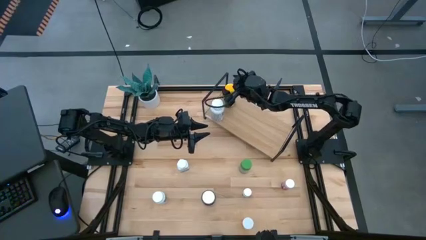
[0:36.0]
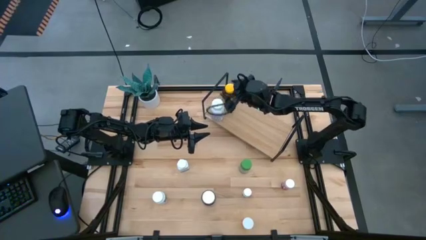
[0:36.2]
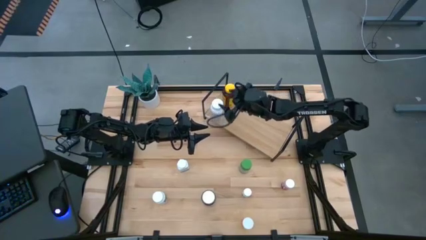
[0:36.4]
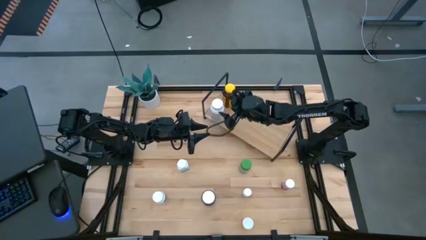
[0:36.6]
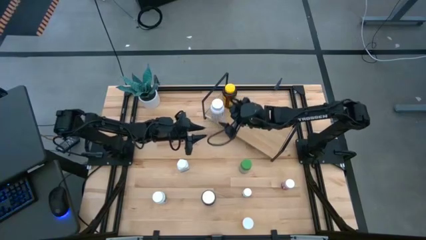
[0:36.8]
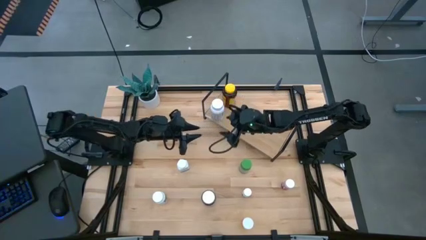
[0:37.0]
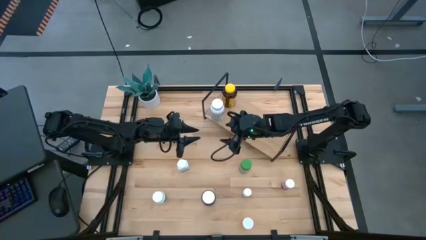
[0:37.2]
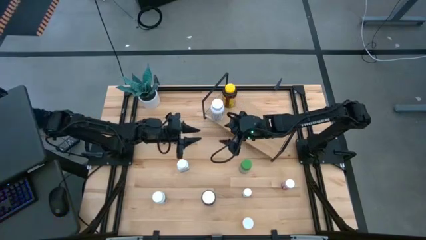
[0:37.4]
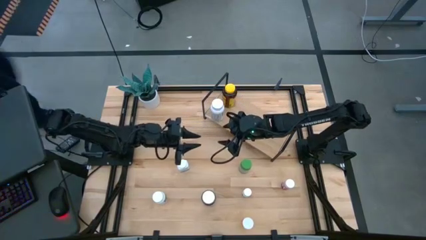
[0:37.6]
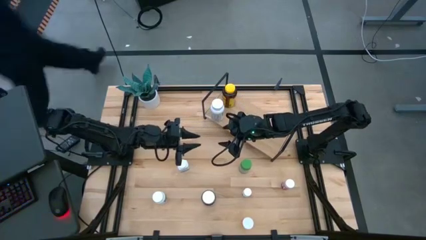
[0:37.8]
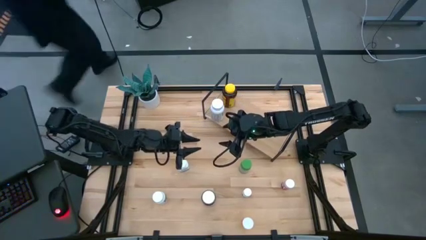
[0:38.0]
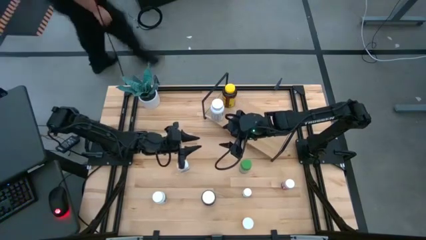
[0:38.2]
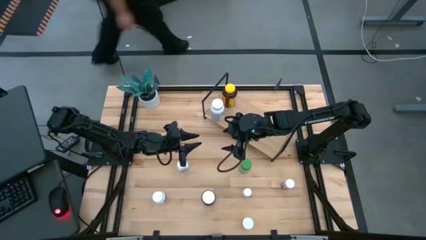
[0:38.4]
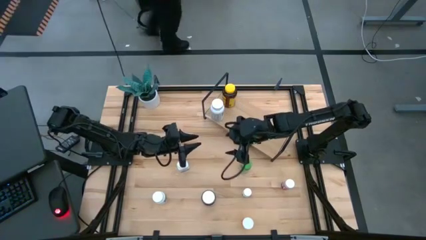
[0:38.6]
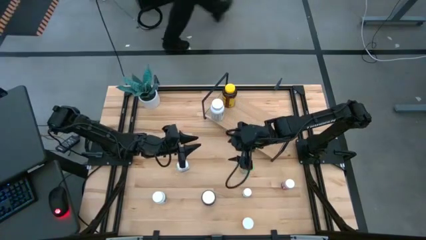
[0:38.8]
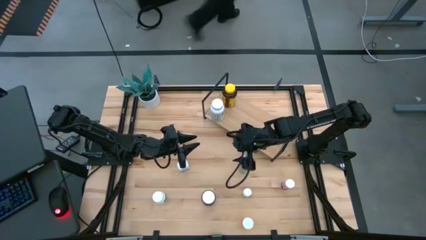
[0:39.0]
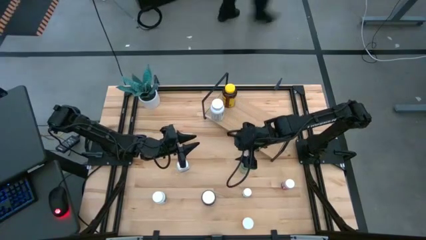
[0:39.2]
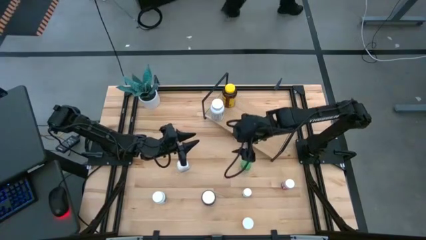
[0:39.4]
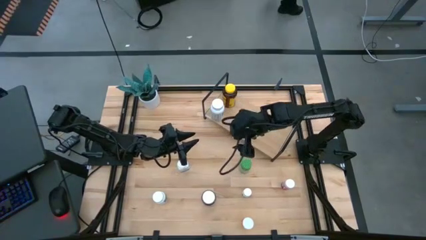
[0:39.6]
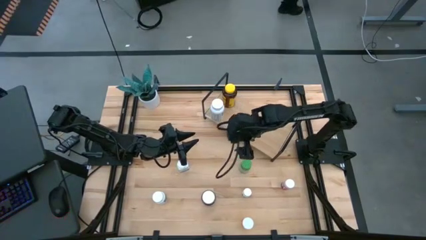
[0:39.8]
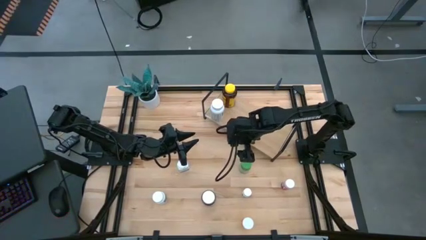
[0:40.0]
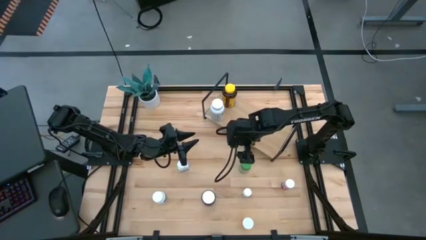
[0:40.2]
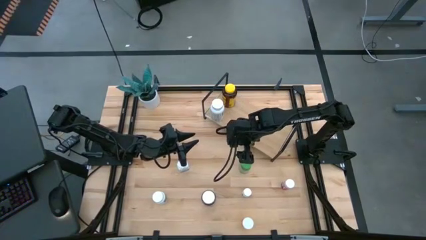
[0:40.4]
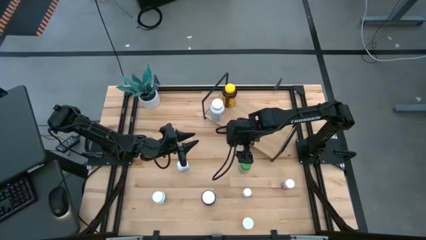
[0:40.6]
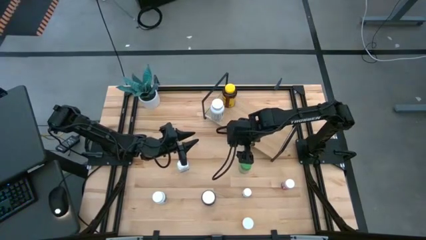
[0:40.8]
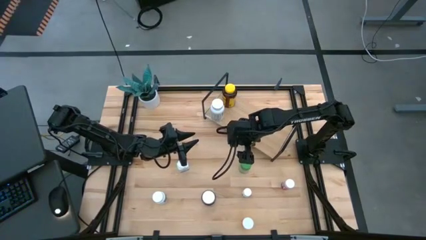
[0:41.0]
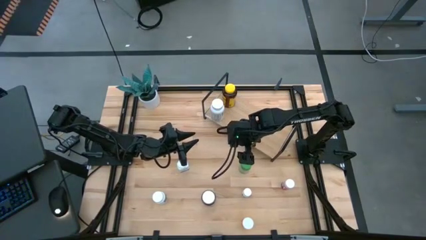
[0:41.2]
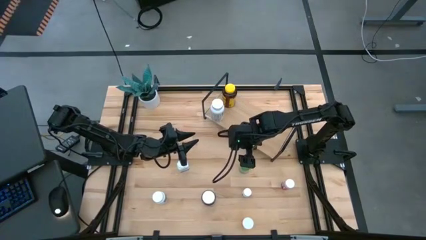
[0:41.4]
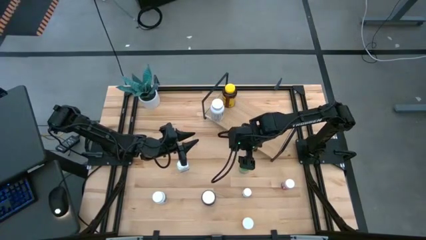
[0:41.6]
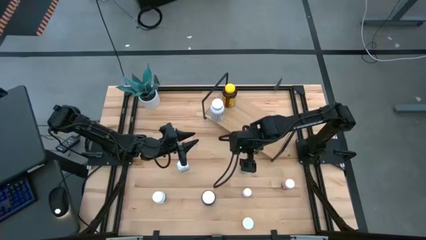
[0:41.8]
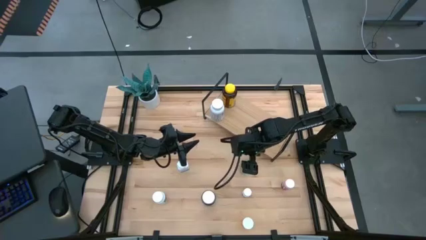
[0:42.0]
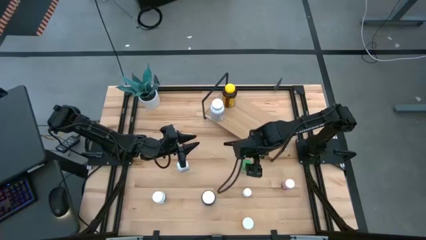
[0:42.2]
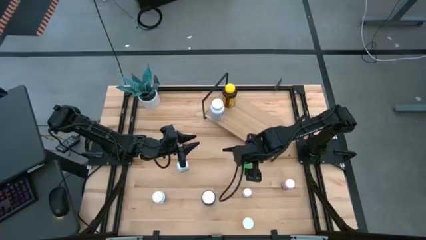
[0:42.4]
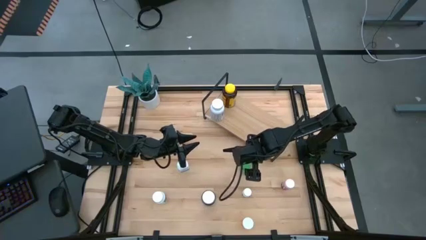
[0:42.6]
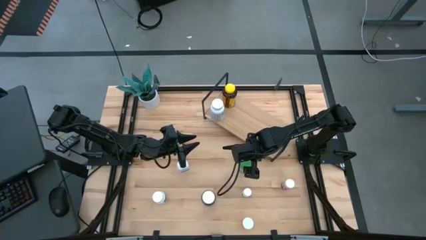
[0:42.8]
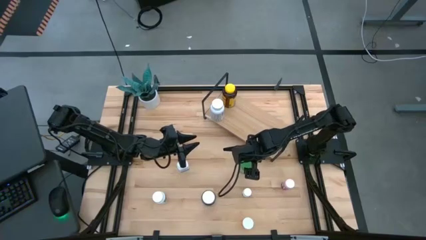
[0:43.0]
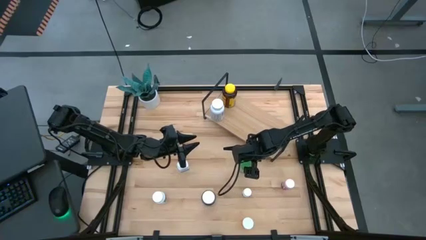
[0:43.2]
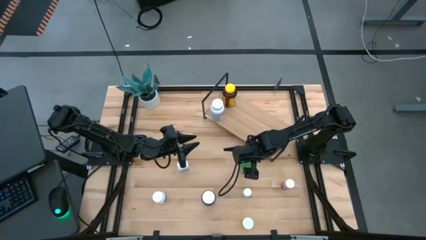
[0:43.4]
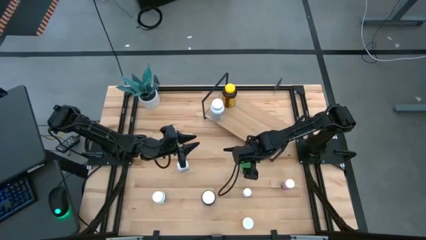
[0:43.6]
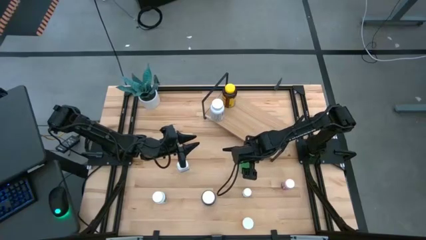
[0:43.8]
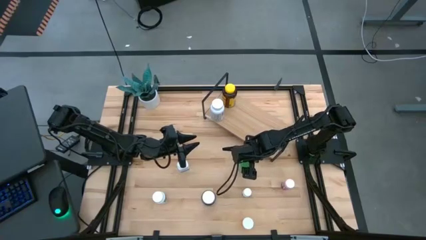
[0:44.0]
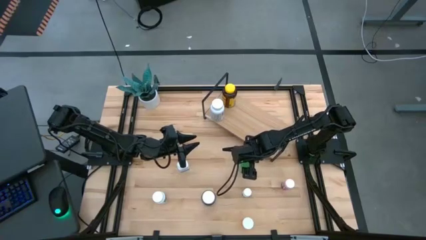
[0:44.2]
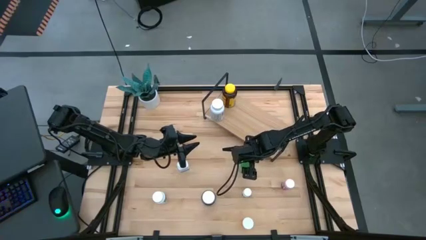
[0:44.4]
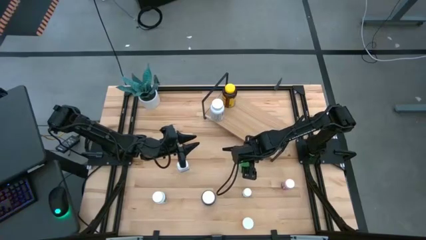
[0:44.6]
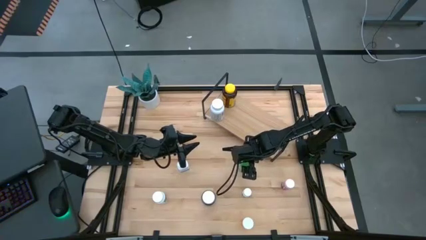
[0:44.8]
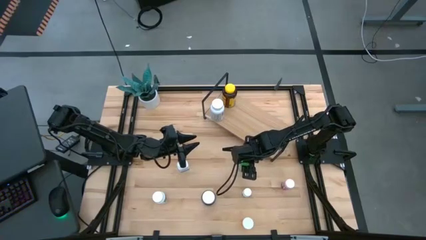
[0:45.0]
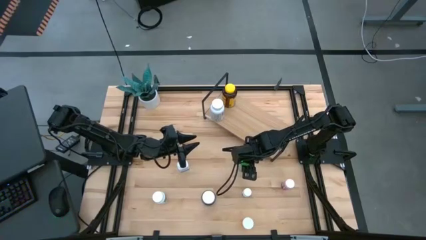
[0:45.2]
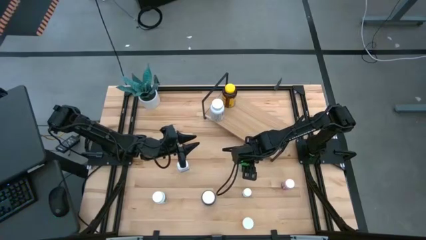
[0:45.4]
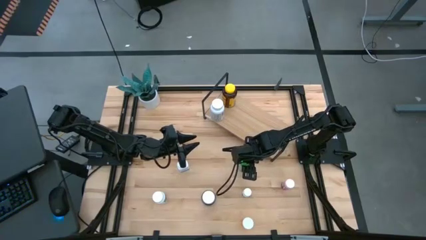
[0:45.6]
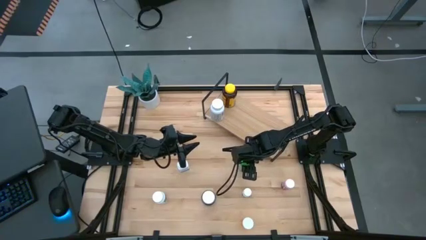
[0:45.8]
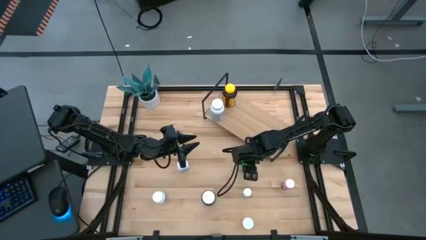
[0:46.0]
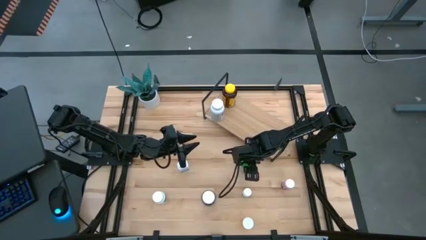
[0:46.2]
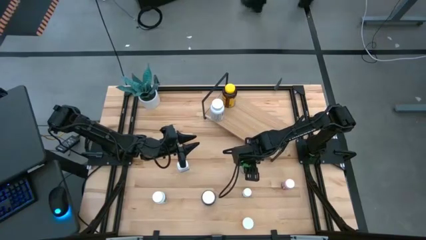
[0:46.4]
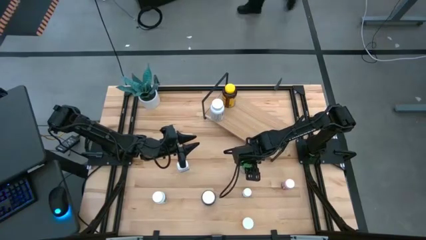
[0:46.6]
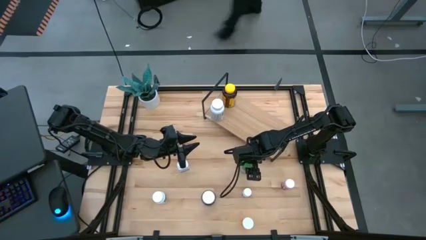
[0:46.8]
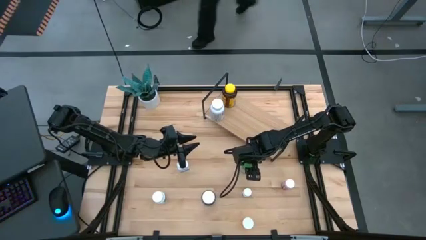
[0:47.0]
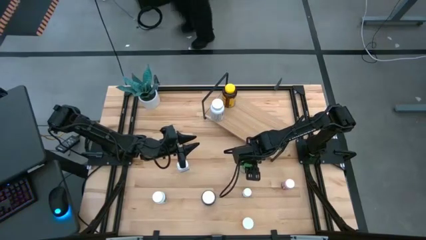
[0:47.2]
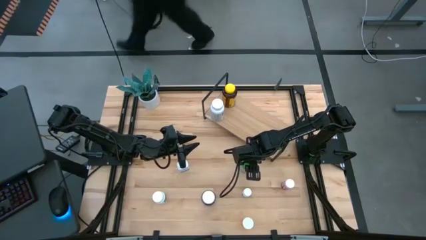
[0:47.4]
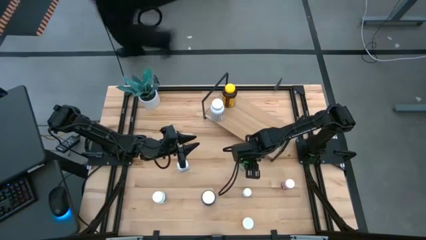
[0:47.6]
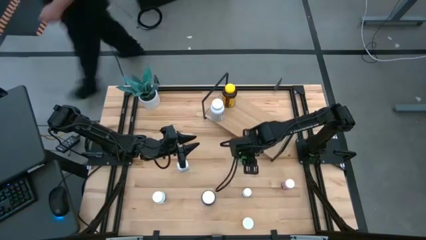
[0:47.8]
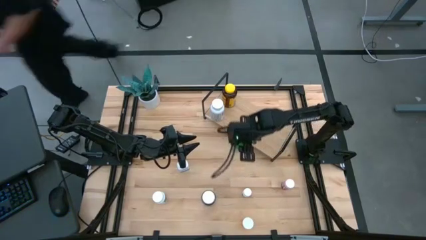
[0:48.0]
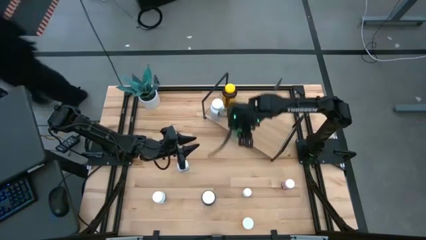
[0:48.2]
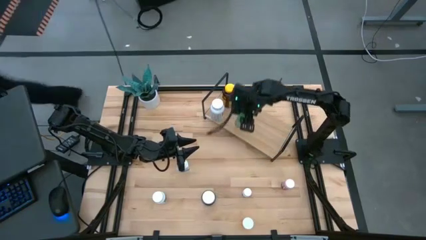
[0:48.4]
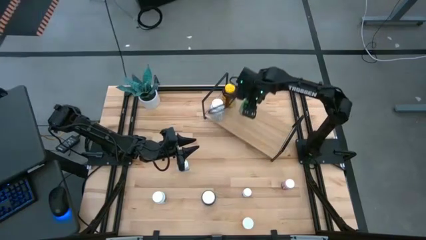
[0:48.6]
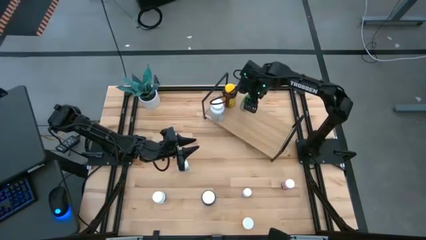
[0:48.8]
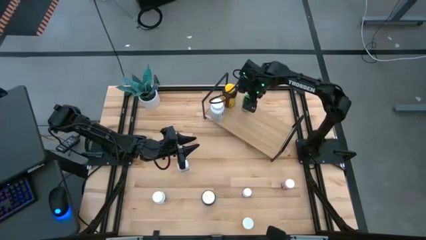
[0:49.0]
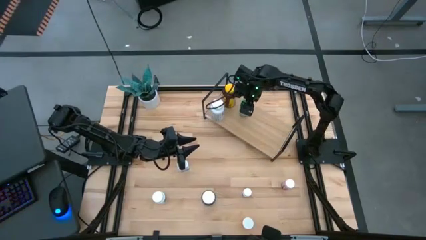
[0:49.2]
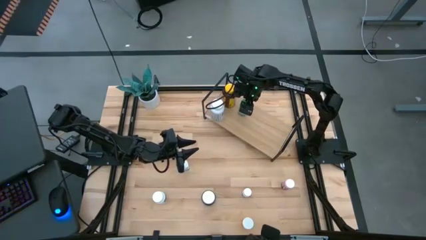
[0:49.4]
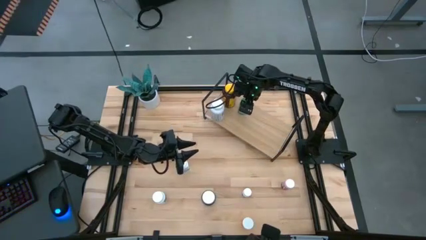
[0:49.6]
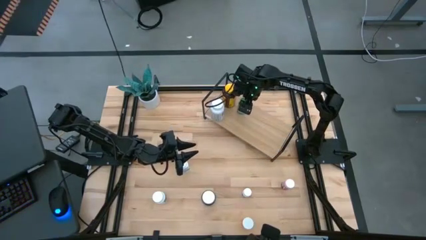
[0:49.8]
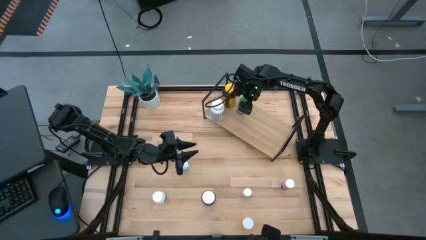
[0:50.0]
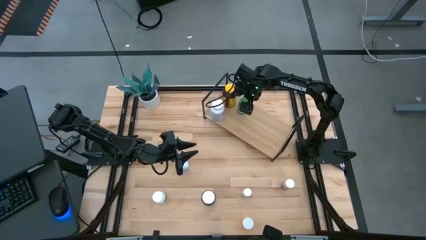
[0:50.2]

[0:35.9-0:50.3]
Task: Pick and place medicine bottles onto shelf by color
Put the light green pill bottle on the shelf
